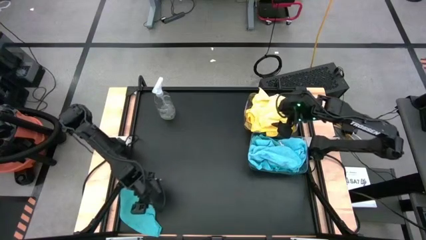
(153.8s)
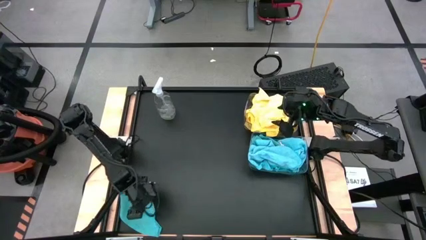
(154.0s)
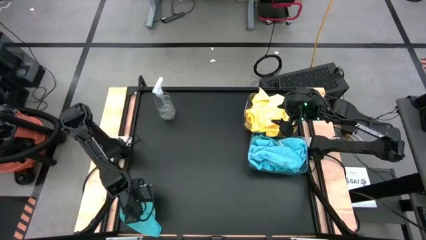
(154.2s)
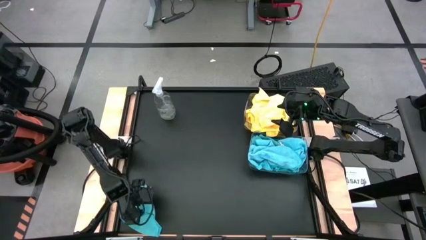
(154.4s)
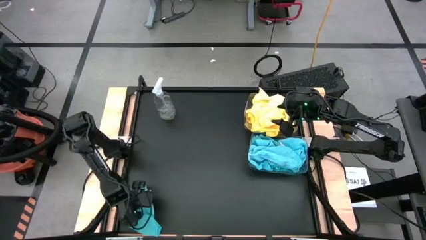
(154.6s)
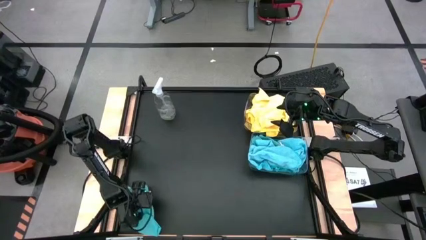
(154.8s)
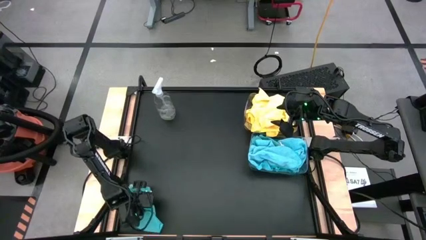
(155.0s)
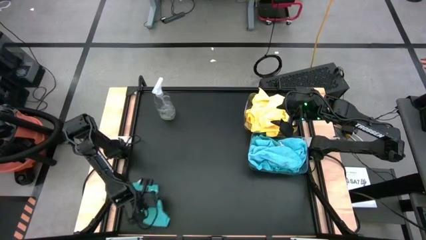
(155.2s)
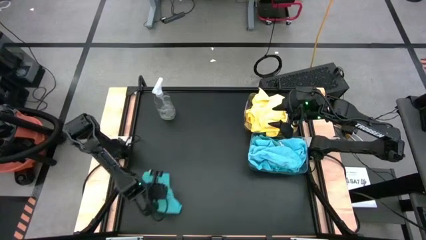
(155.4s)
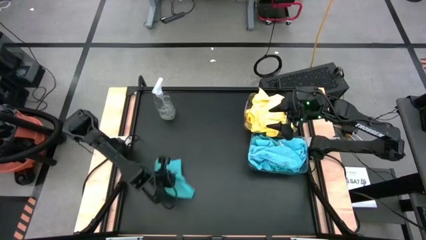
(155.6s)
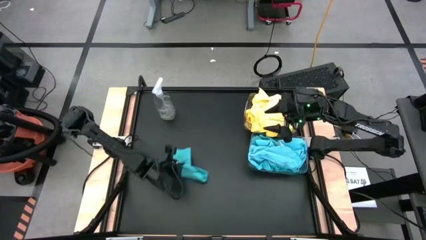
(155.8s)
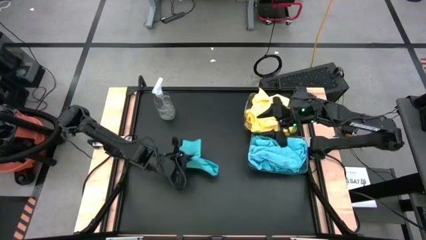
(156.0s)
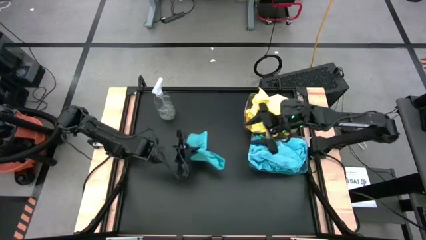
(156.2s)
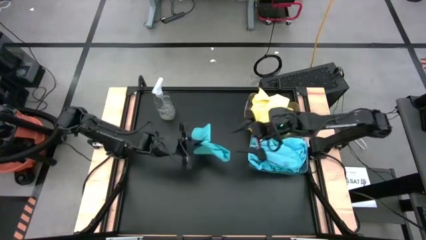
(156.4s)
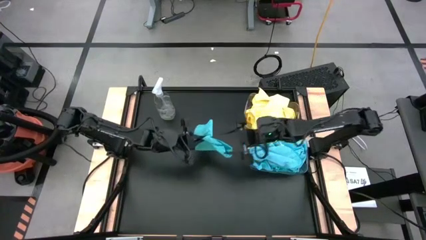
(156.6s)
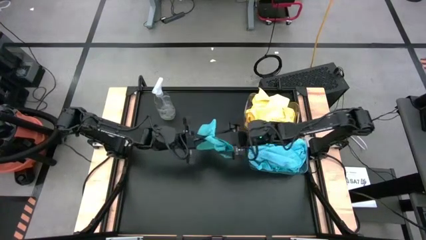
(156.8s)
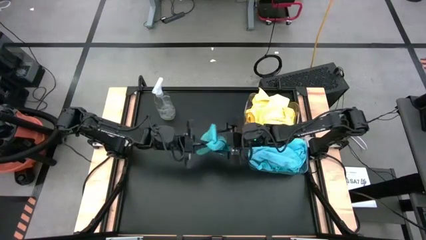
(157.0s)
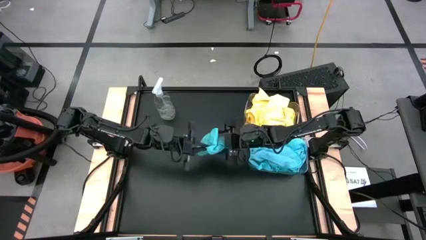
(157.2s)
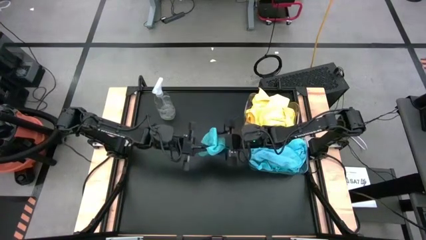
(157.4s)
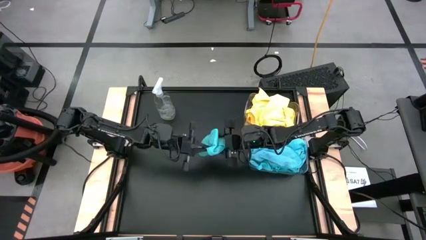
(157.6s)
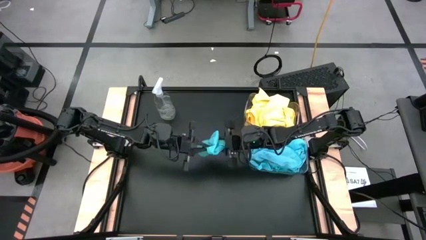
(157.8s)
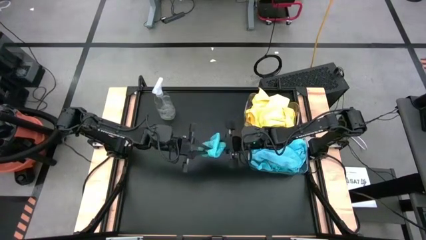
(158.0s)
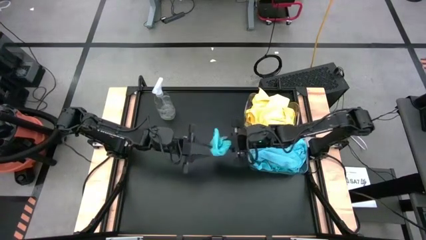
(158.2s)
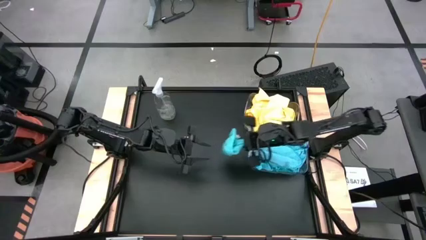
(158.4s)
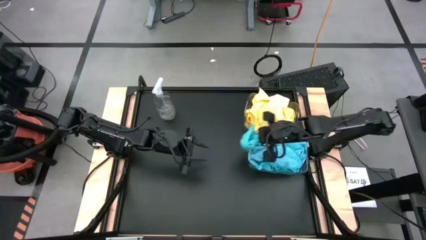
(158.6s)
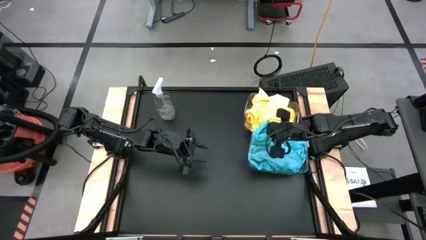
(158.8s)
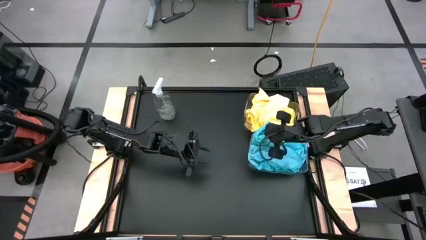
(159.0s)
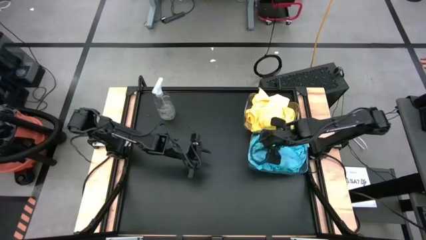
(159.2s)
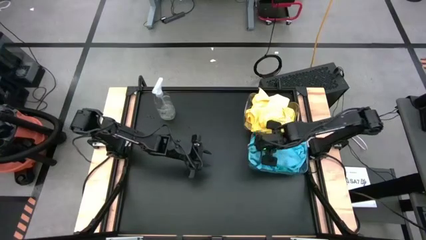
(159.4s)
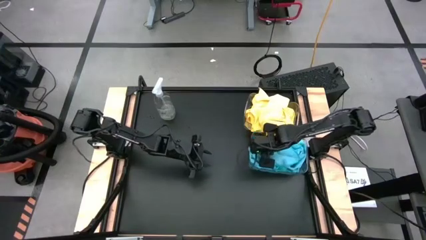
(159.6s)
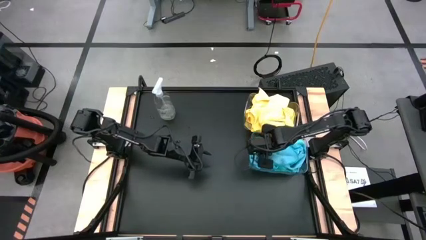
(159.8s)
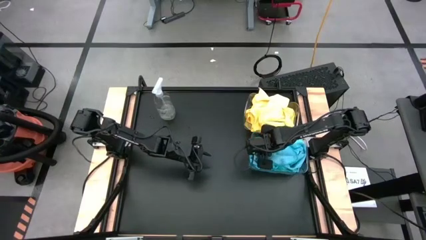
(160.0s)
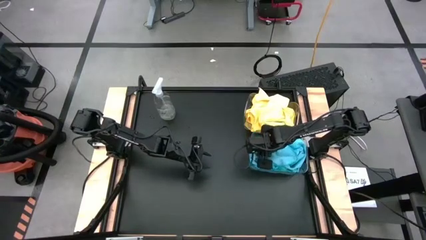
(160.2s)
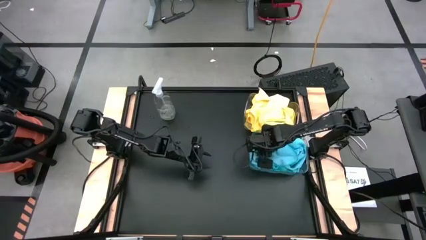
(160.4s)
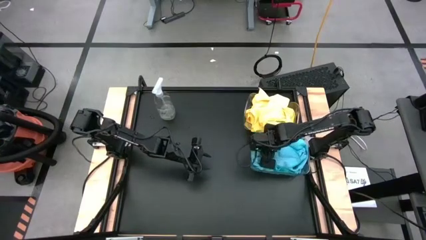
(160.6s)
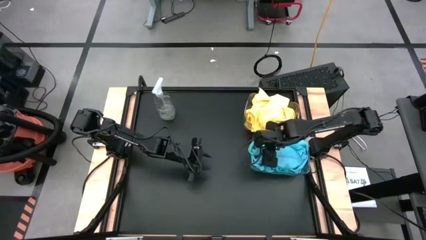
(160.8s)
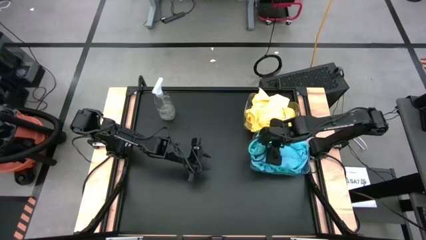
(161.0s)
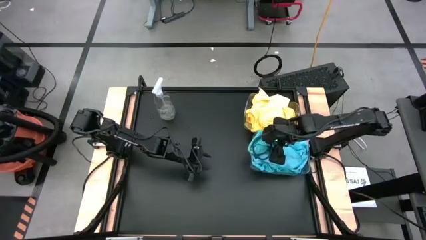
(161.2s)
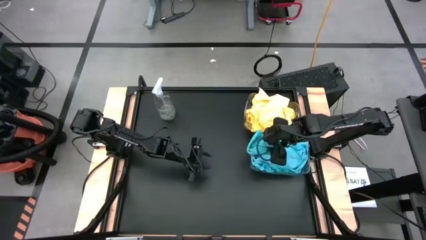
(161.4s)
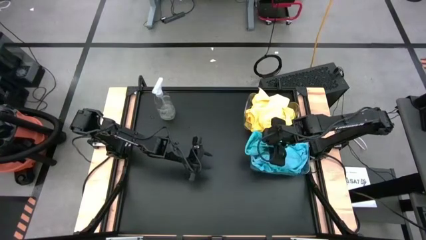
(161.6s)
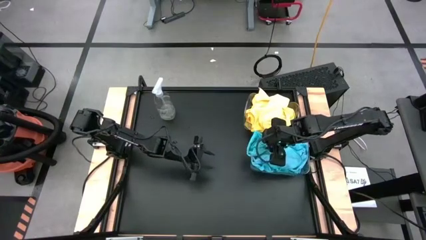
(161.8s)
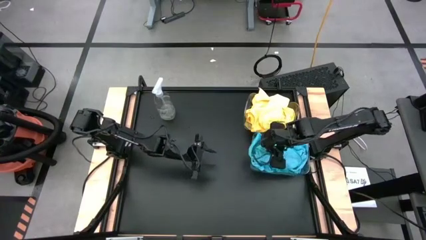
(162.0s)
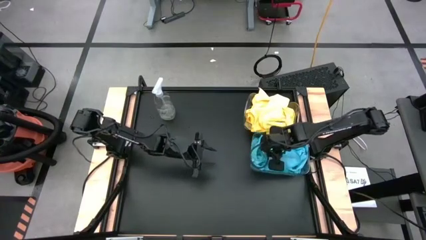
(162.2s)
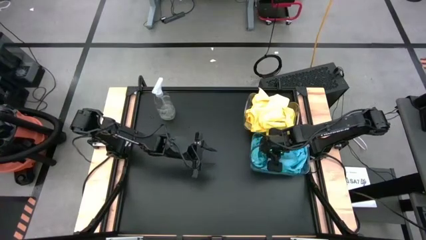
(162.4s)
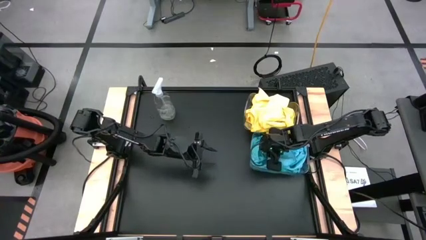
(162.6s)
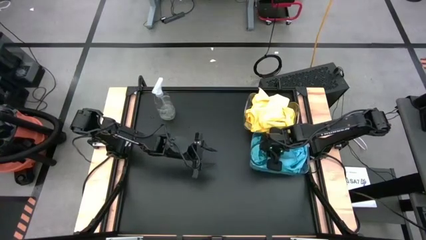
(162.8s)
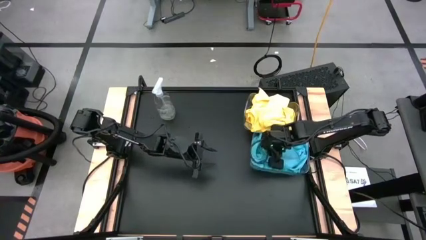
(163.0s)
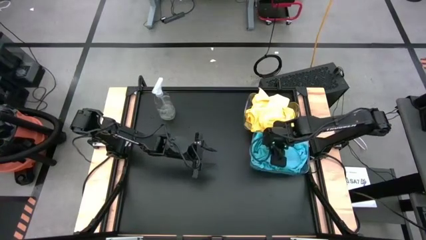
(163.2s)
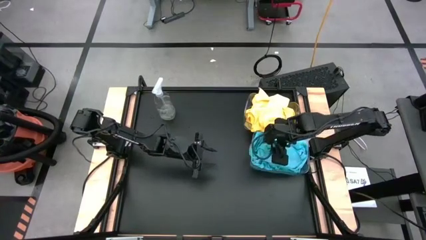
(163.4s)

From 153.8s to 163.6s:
Task: Sort microfiber towel by color & place in baskets
Put the blue microfiber towel into the bottom transparent bin

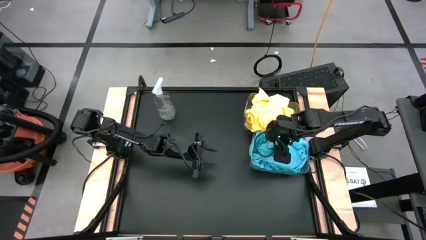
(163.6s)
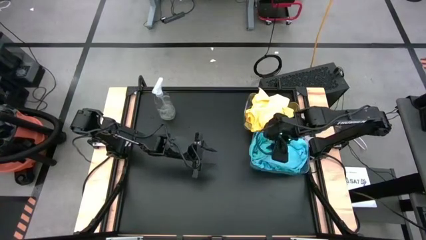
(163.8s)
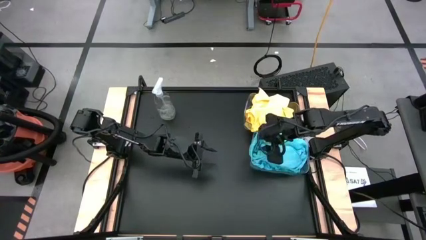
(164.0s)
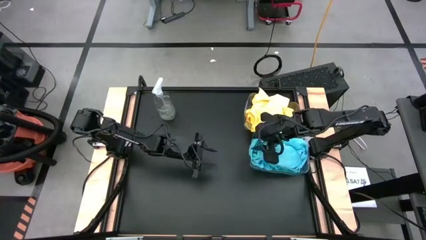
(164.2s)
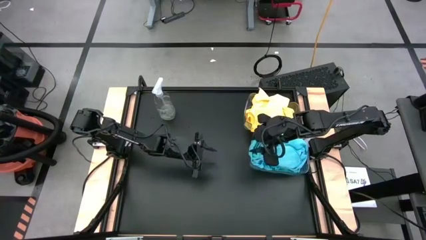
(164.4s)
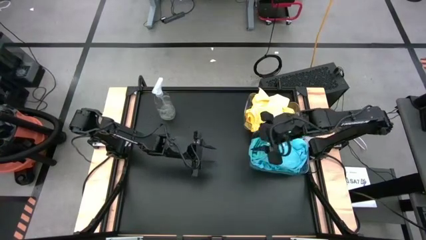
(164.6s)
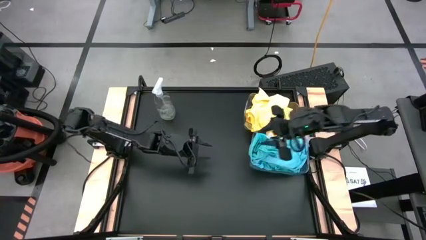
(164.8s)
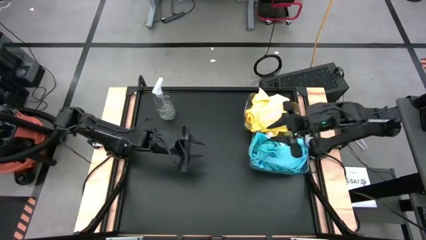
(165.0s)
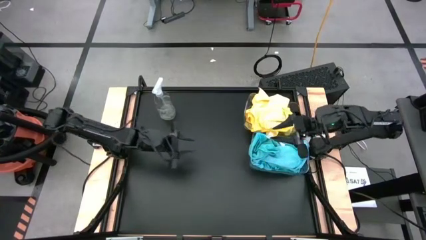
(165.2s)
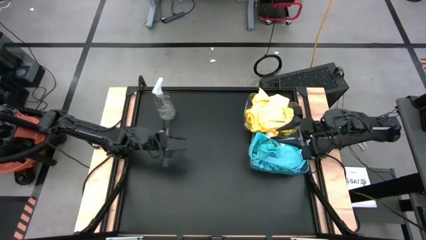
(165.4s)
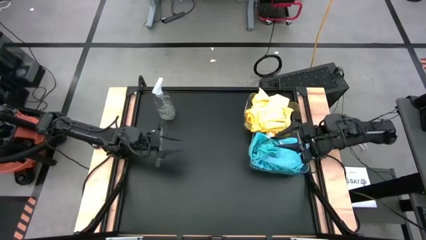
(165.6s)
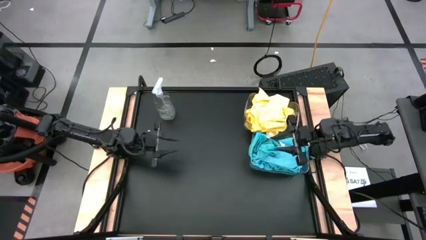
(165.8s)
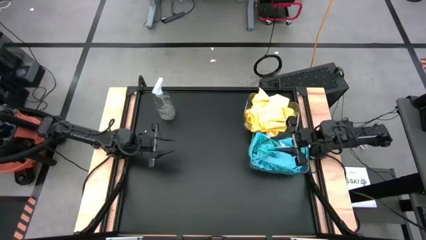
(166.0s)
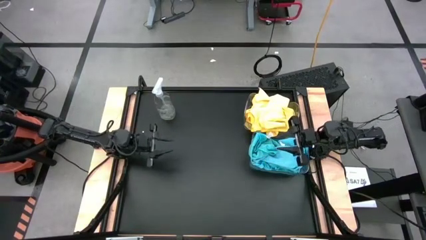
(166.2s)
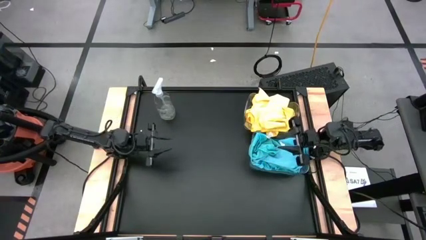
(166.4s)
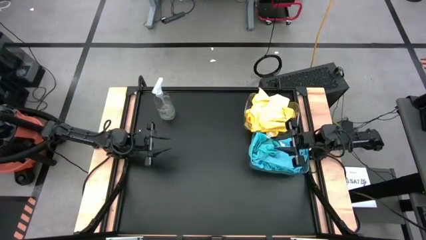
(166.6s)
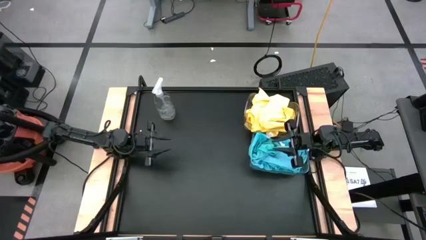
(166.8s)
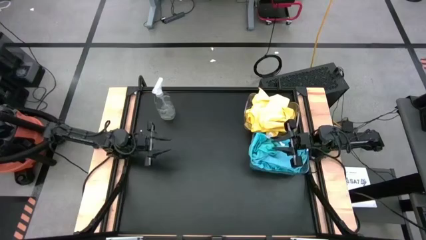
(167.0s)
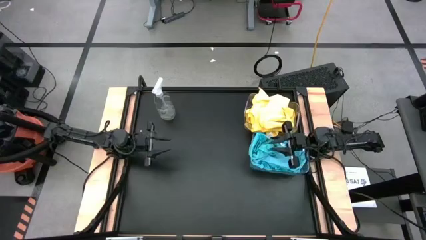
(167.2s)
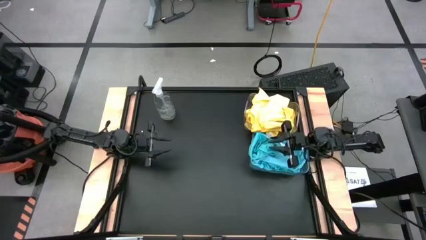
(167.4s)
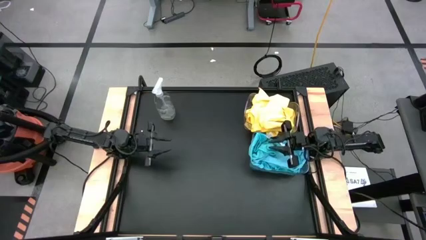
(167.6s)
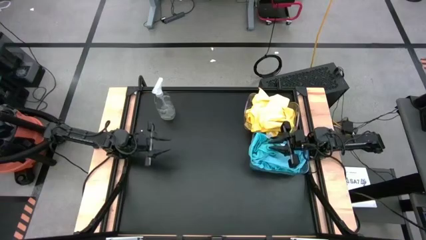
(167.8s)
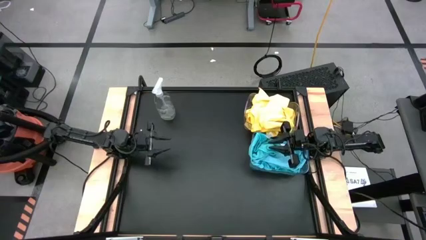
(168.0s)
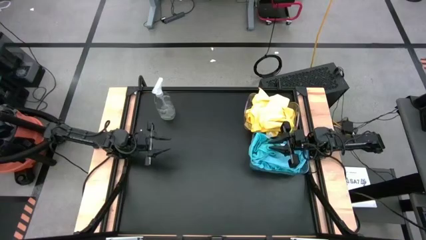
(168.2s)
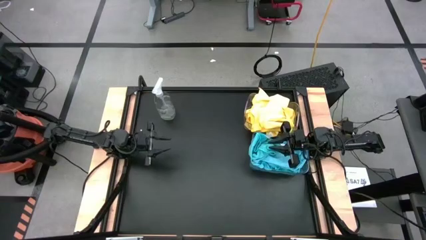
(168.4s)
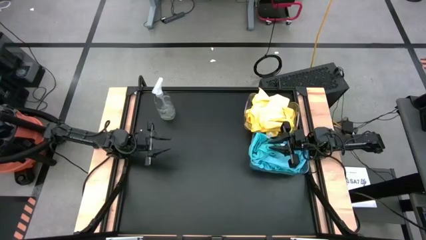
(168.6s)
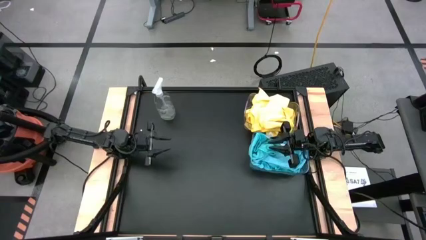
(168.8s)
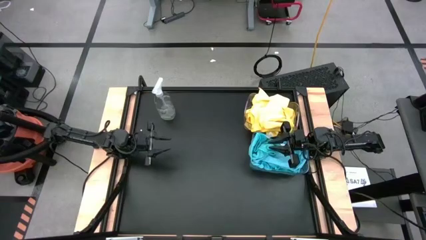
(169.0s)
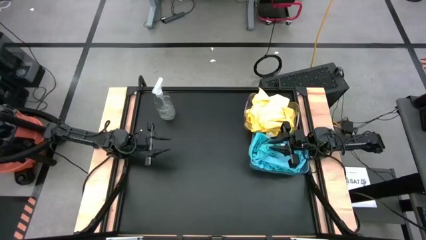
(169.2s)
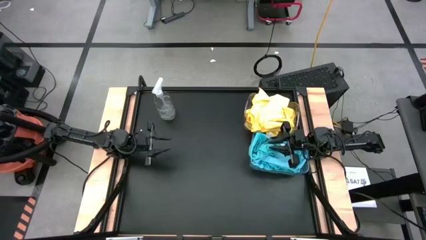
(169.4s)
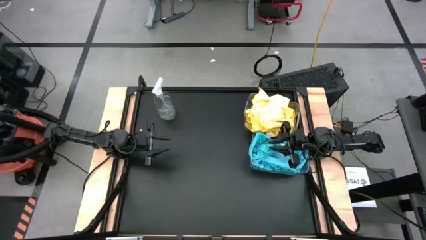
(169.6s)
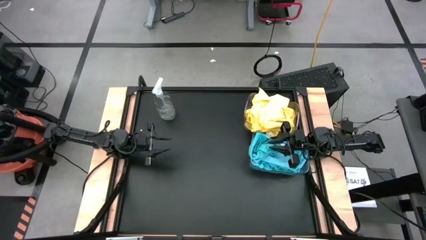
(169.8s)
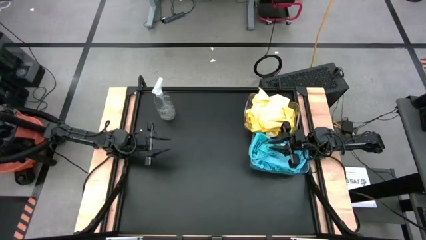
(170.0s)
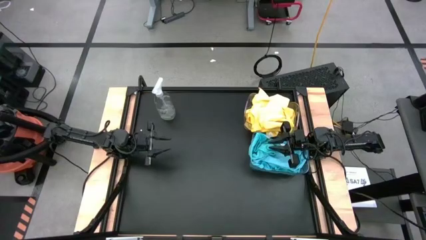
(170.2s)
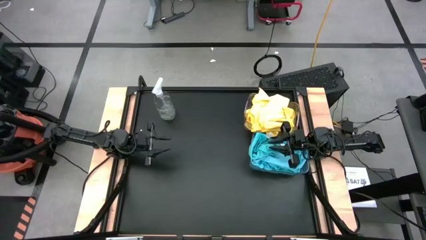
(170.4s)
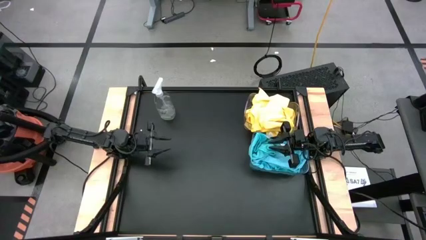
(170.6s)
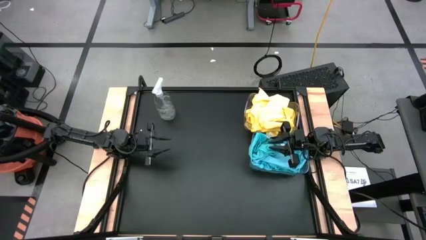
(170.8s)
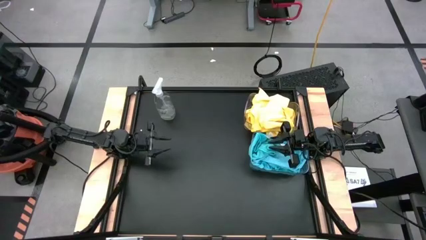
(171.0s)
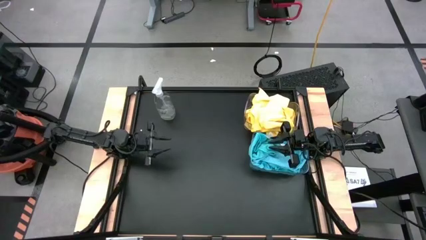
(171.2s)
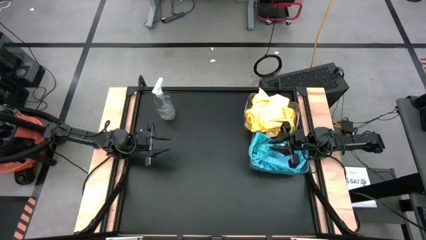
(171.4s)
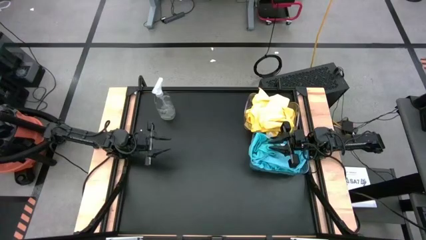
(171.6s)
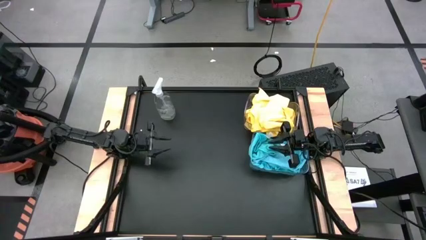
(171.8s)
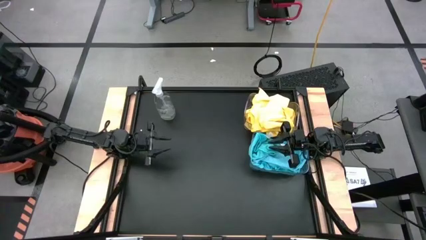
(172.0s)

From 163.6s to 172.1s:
Return to Home Position
